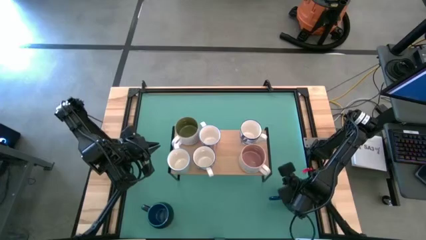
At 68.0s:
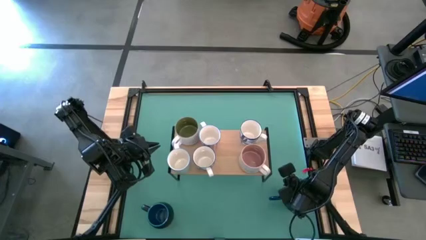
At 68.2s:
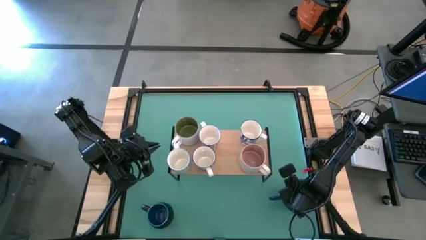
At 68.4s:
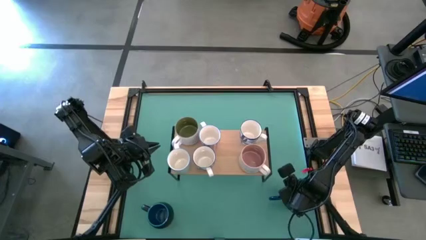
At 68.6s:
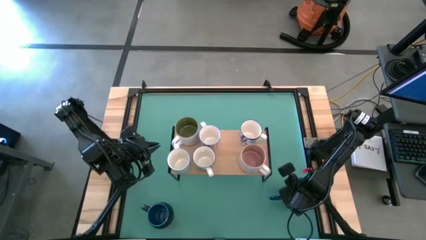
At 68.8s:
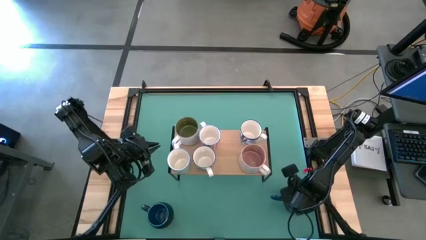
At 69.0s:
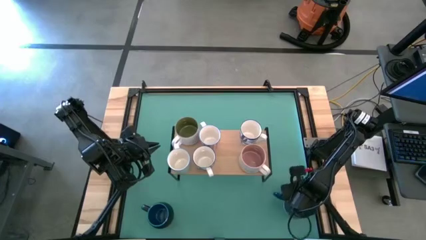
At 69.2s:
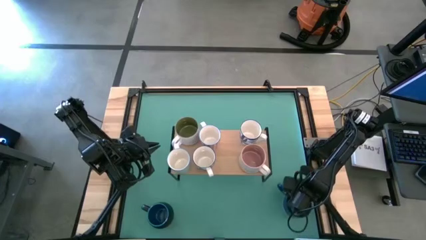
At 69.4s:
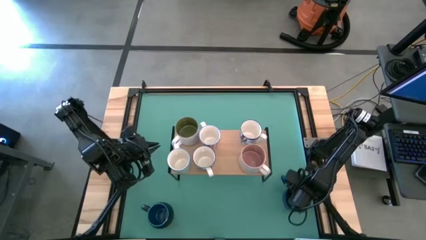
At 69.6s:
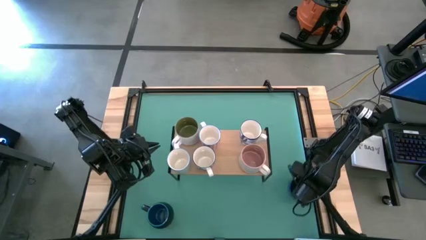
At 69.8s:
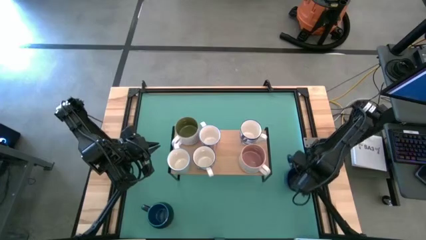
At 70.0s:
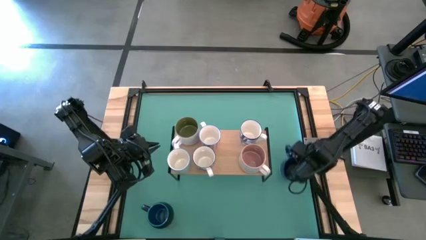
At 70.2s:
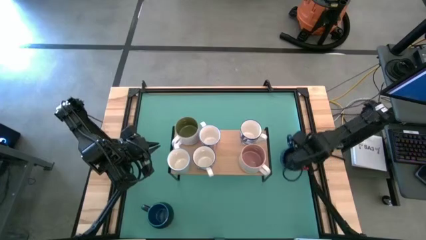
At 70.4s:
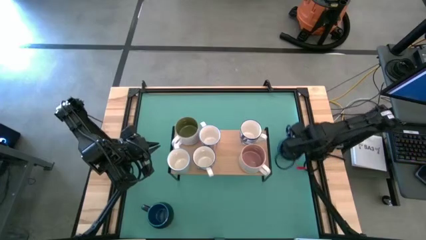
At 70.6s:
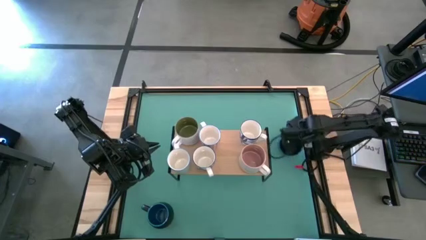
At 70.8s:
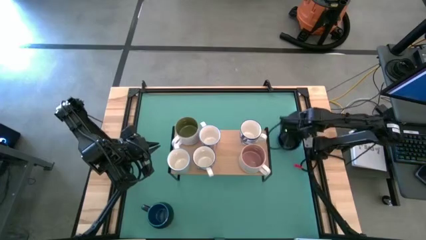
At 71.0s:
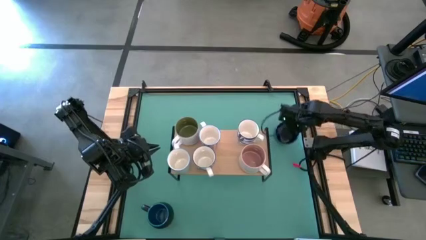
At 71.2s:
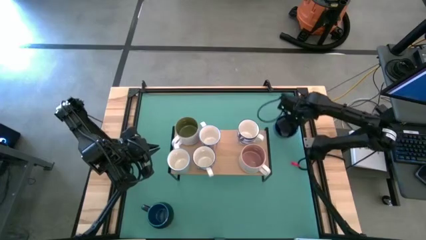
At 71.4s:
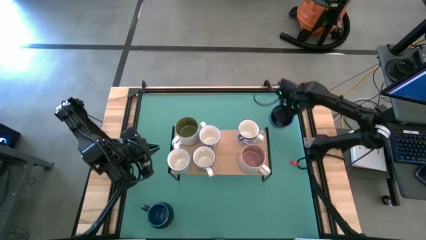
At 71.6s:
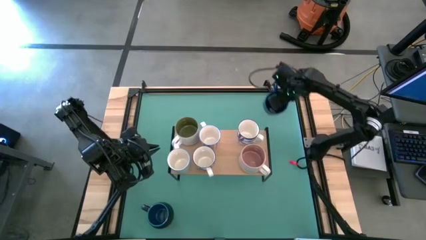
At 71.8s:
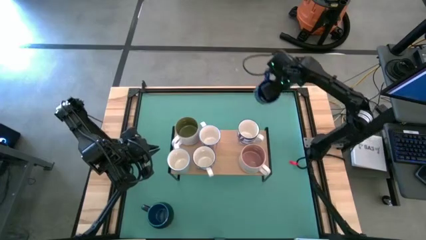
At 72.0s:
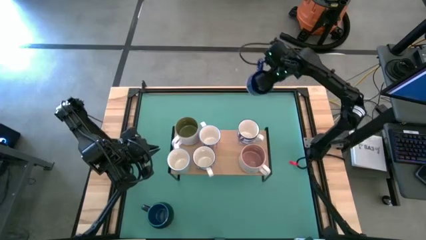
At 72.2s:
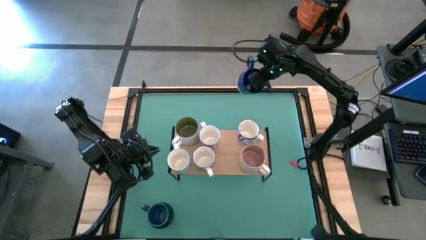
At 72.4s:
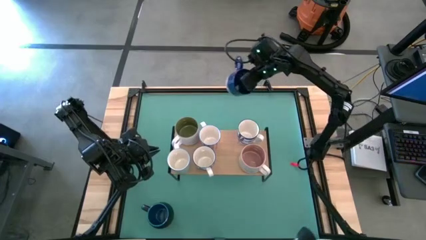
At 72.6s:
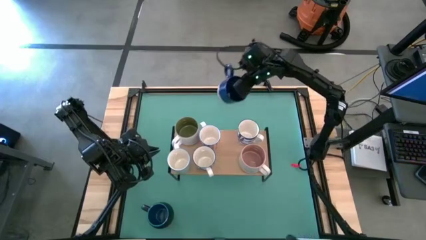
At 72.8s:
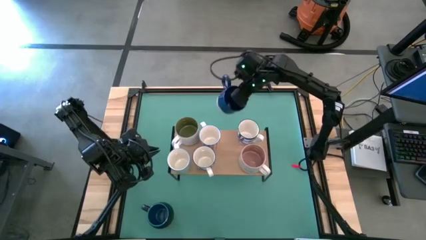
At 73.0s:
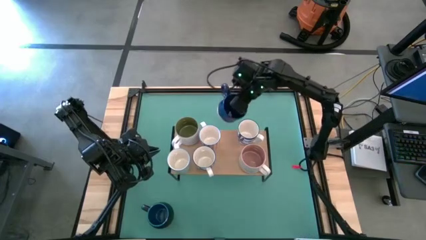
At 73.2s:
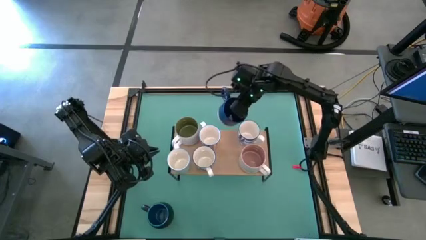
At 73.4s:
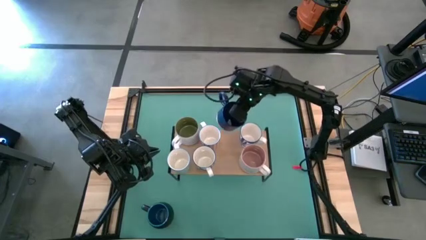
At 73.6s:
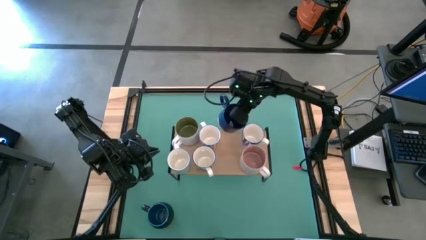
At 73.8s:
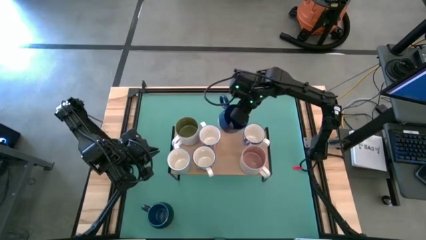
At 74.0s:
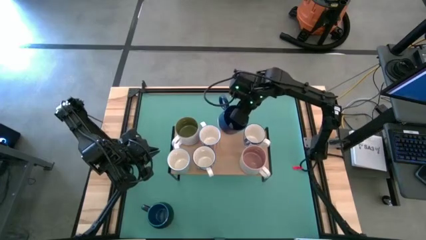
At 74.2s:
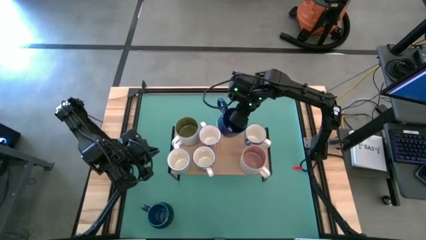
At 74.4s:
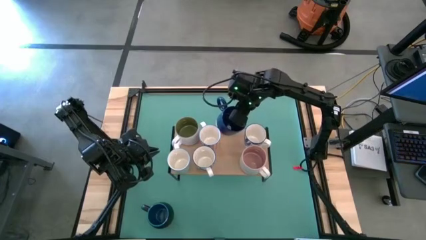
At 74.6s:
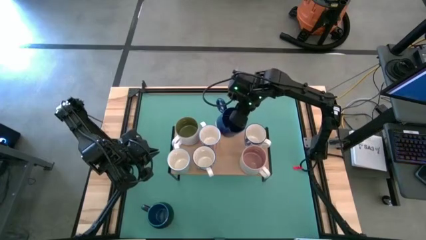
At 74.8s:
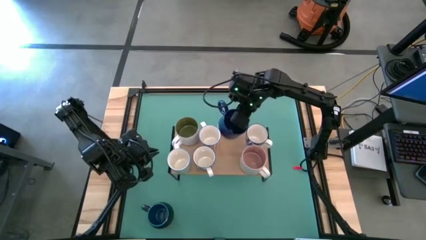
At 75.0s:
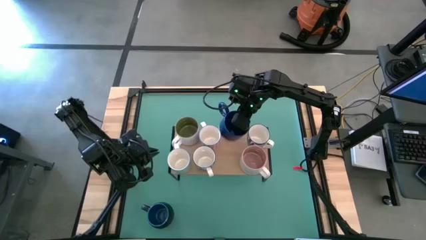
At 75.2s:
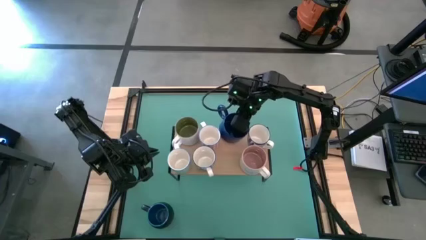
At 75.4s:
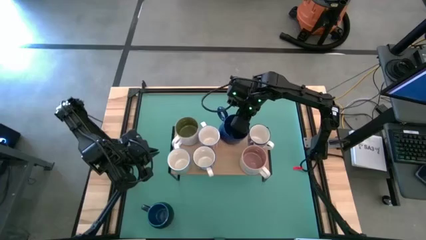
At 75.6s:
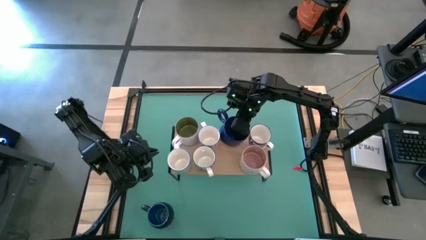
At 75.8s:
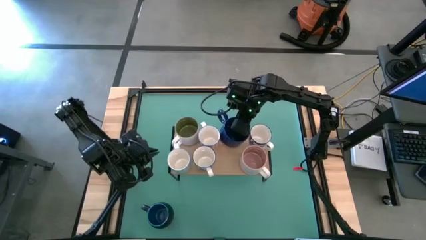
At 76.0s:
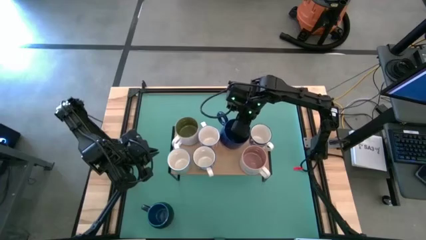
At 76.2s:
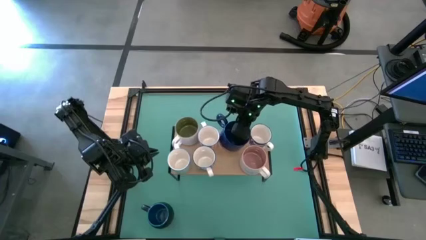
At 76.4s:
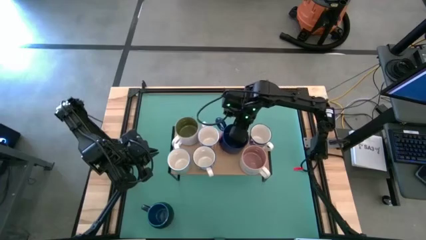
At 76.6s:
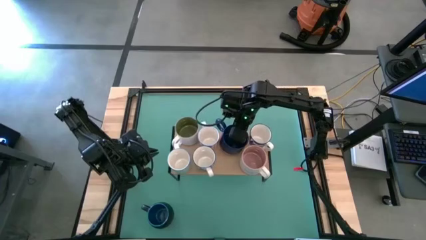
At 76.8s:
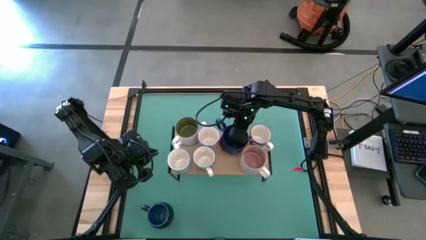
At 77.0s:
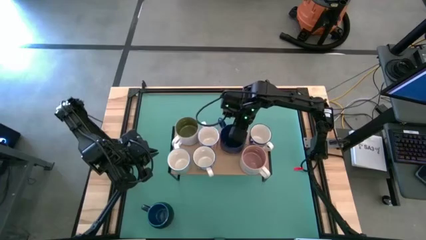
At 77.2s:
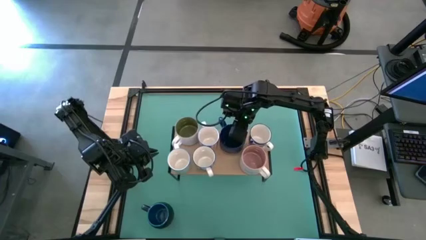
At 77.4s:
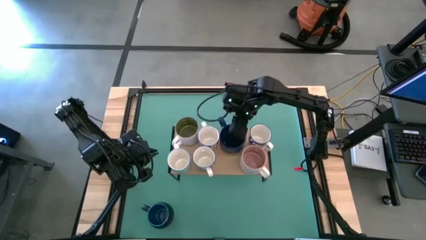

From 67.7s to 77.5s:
Task: Place coffee mugs
Put the right blue mug on the shelf
